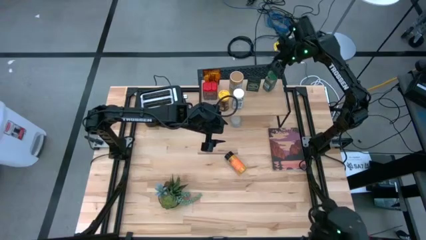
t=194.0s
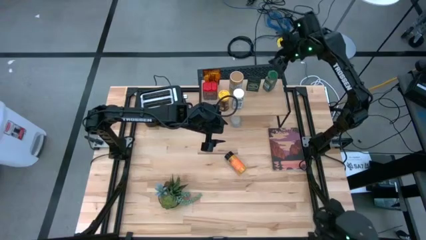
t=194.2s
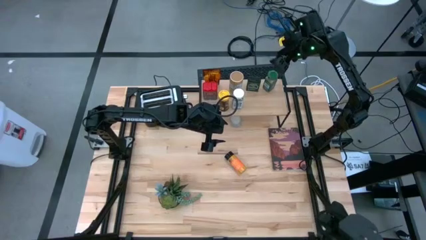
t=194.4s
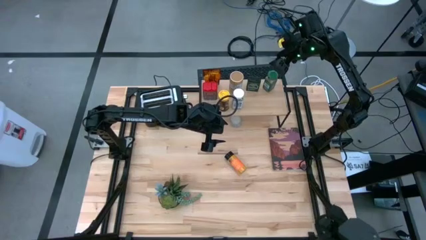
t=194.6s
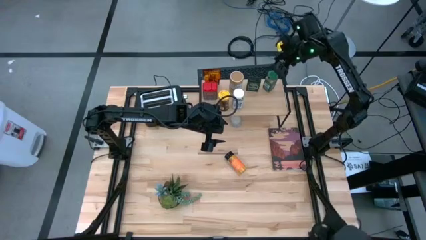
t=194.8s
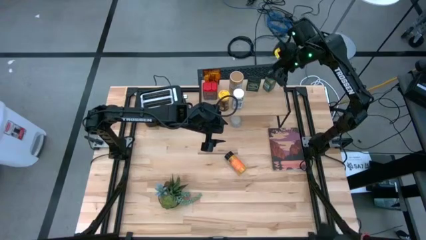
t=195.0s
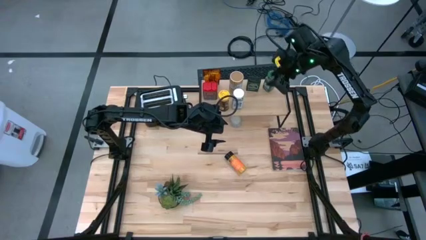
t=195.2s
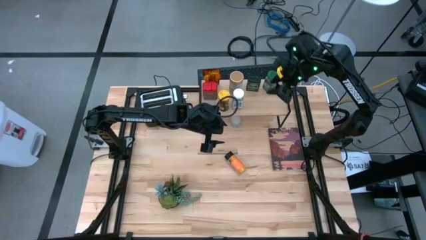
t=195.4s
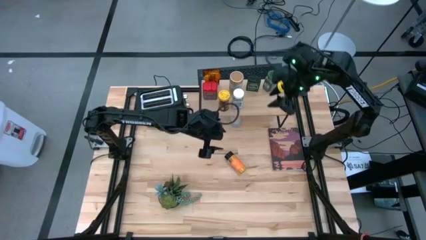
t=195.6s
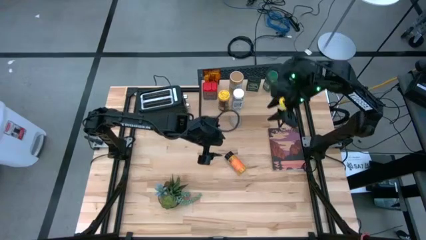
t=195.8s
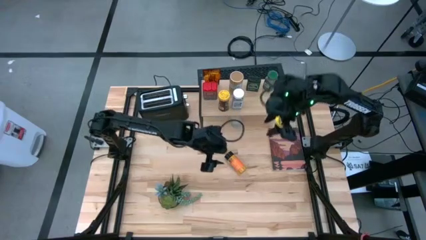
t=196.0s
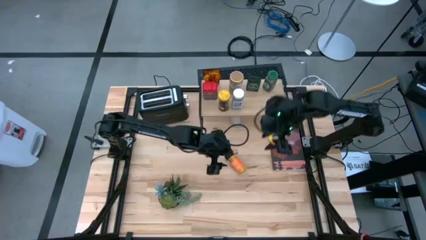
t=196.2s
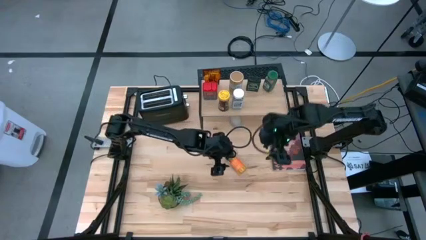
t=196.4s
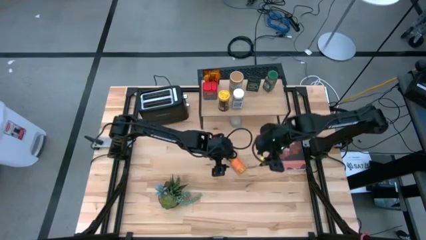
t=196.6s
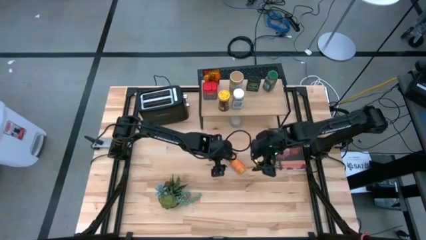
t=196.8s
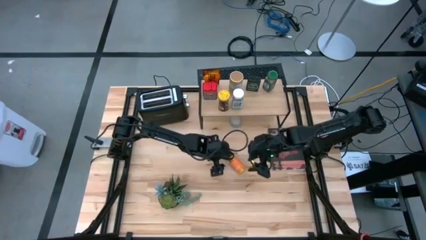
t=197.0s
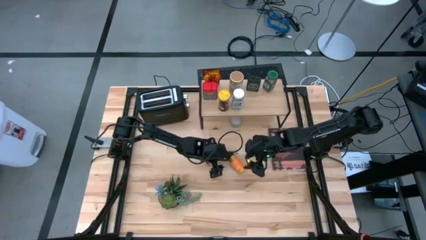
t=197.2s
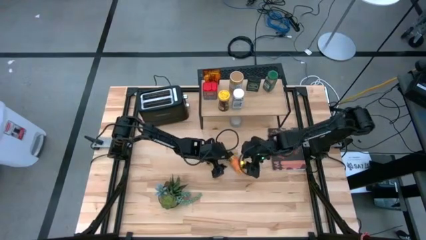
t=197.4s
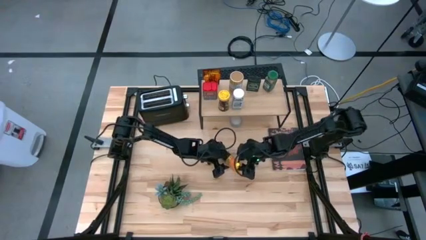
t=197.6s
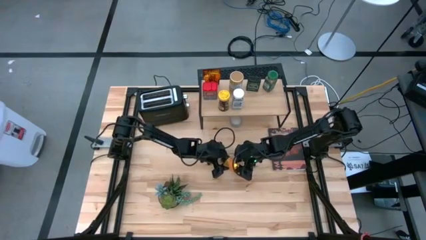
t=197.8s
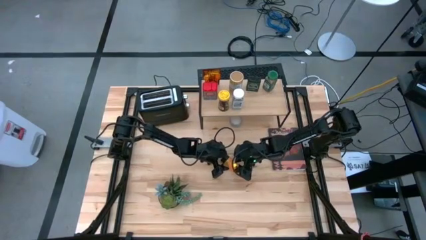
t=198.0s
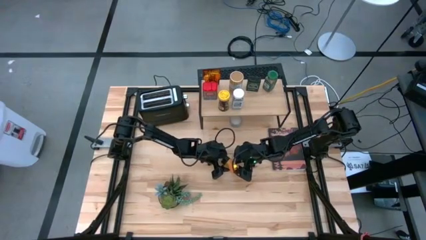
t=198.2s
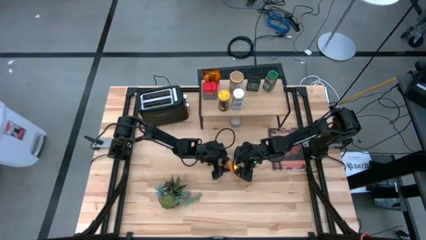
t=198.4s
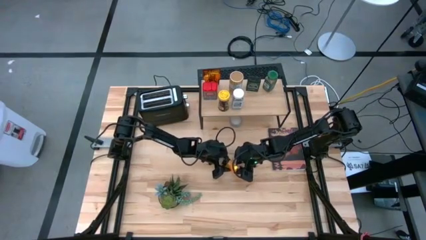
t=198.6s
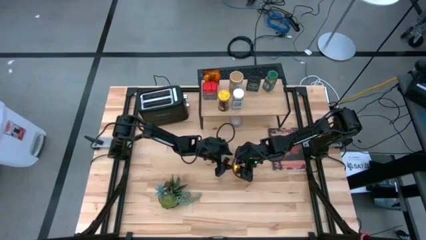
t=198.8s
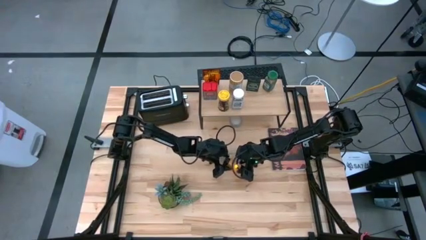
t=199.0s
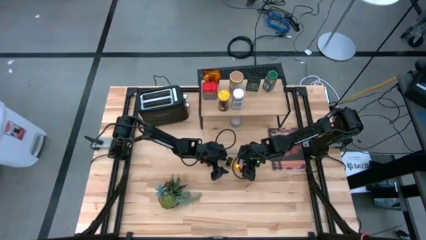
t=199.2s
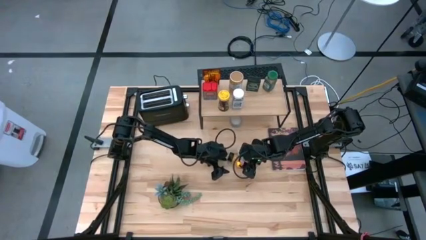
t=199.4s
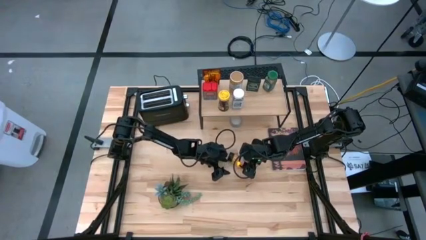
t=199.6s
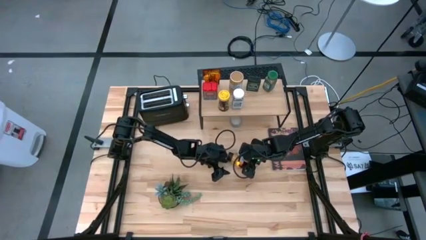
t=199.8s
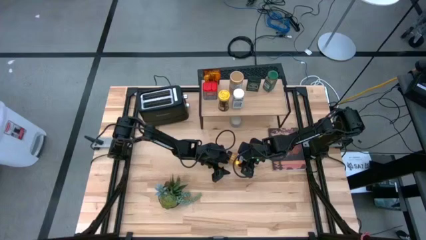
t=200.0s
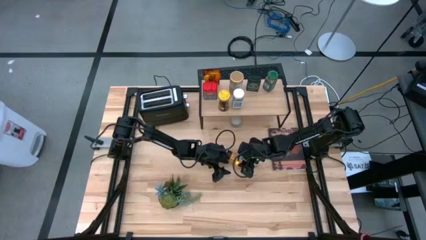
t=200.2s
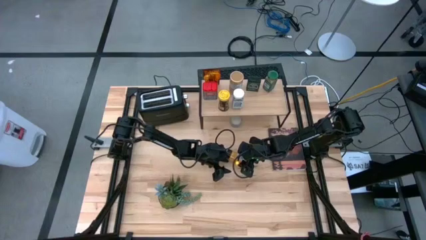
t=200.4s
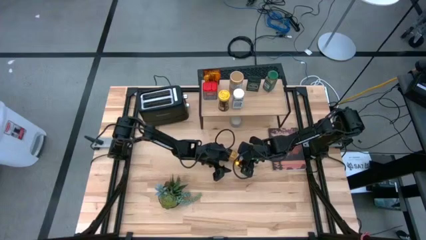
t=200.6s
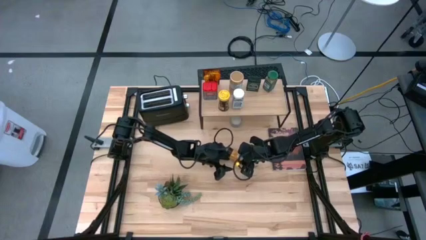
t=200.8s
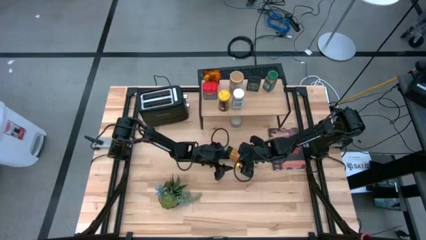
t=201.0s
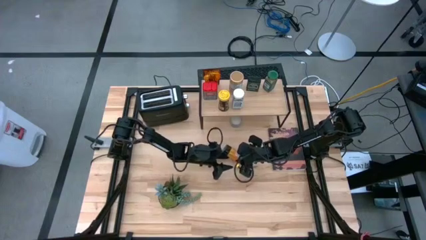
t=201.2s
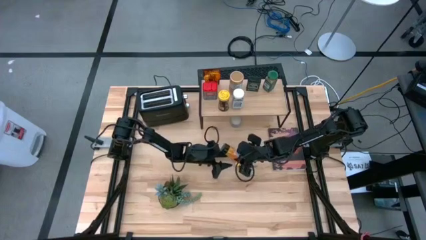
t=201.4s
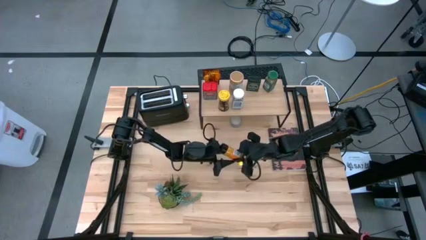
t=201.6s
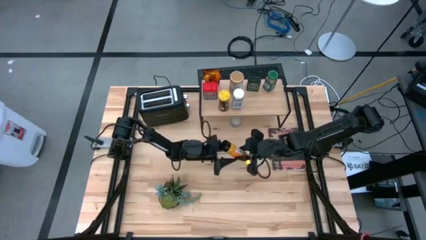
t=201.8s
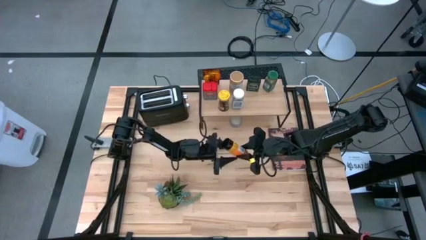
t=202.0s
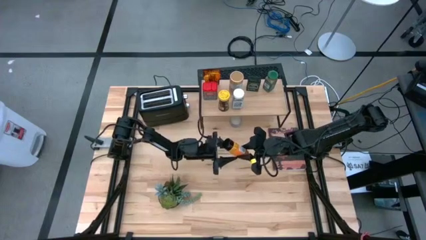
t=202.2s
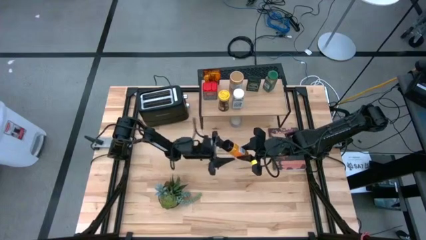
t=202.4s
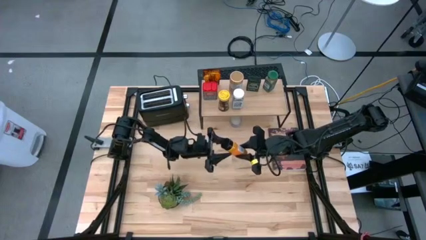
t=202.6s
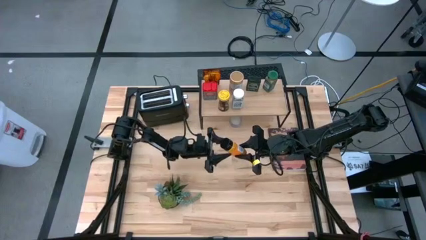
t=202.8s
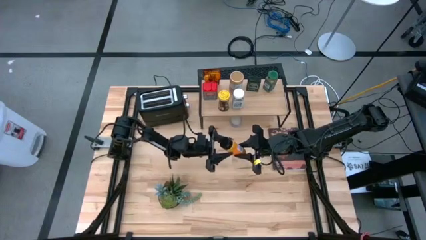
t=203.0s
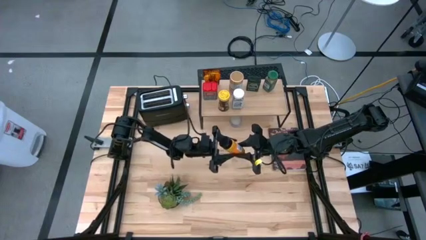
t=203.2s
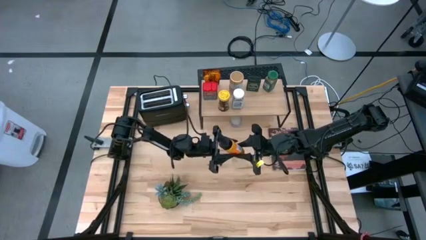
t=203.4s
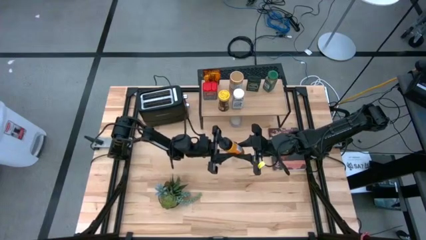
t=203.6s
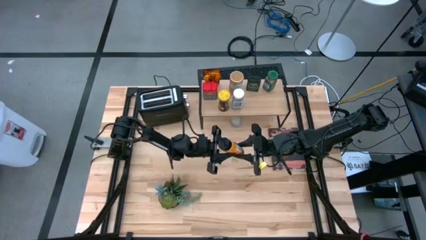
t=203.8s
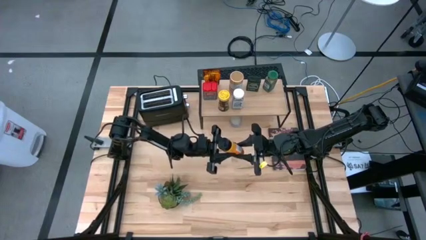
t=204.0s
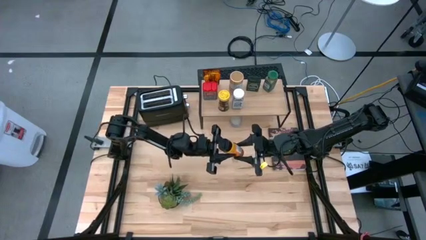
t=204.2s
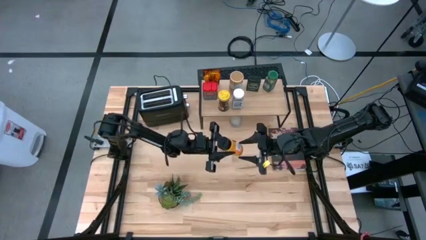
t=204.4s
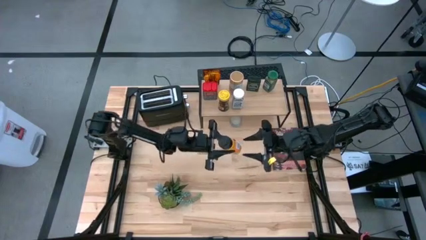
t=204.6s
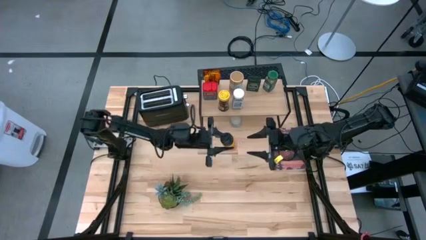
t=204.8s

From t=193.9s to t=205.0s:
Task: Shelf spices
Put the orange seasoning bottle on the shelf

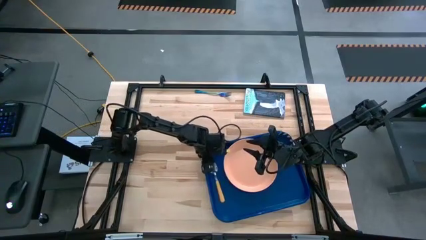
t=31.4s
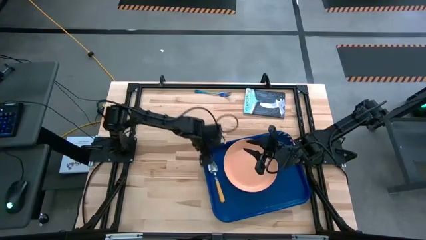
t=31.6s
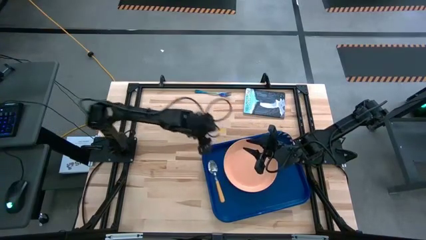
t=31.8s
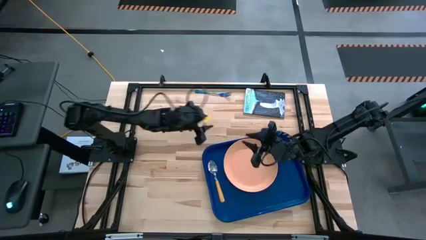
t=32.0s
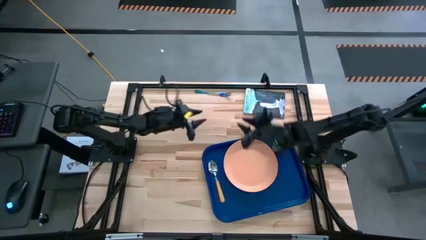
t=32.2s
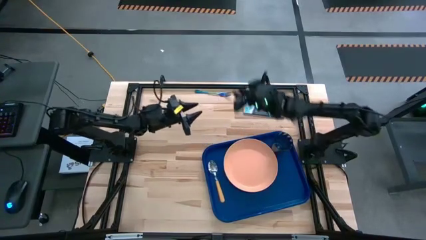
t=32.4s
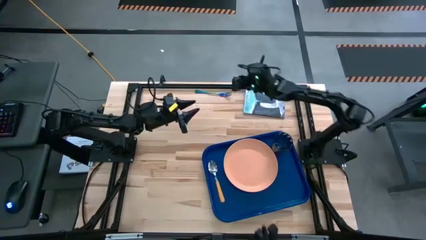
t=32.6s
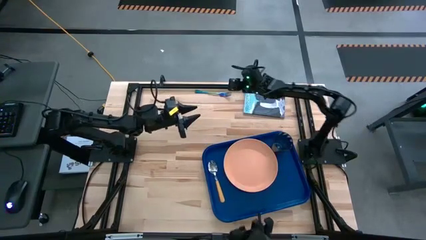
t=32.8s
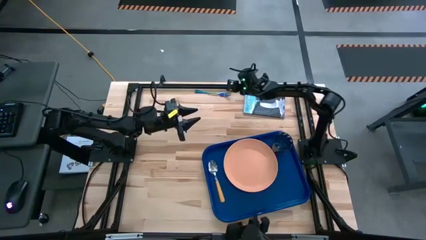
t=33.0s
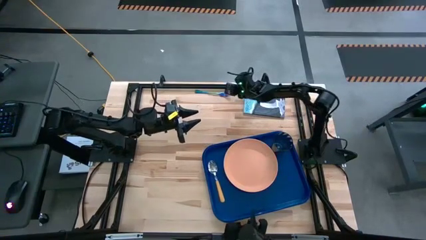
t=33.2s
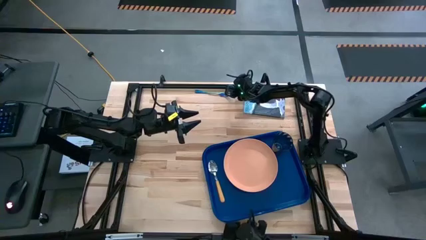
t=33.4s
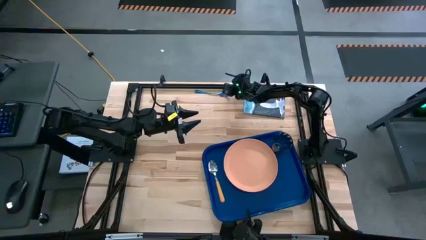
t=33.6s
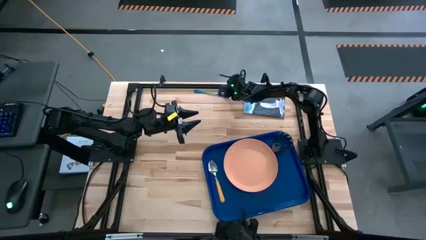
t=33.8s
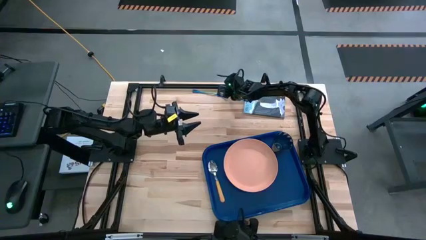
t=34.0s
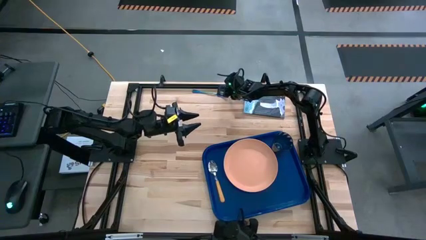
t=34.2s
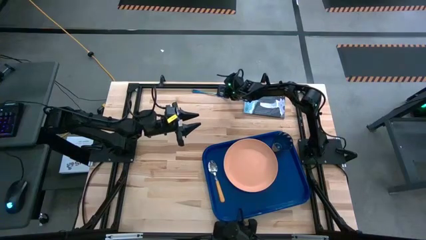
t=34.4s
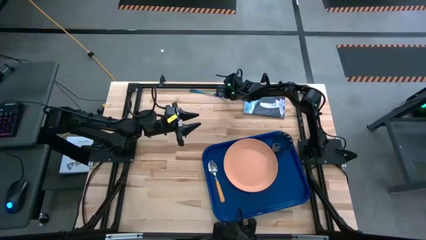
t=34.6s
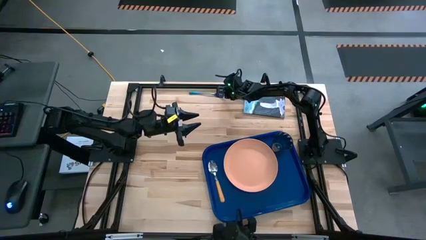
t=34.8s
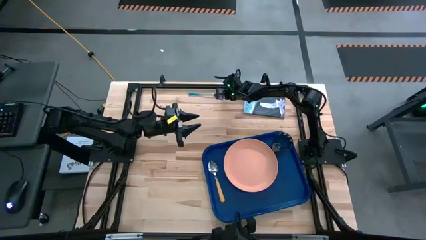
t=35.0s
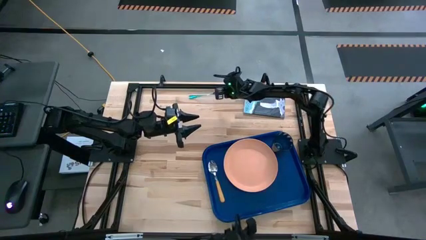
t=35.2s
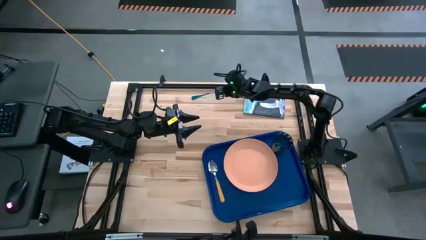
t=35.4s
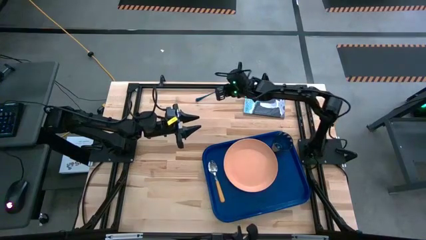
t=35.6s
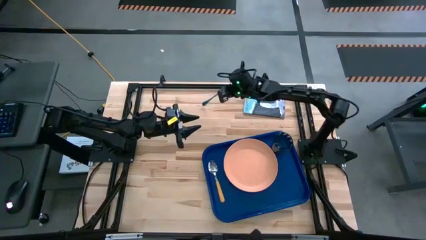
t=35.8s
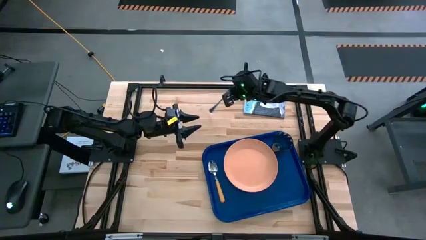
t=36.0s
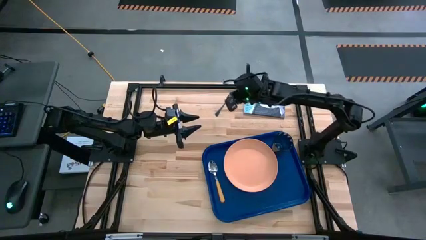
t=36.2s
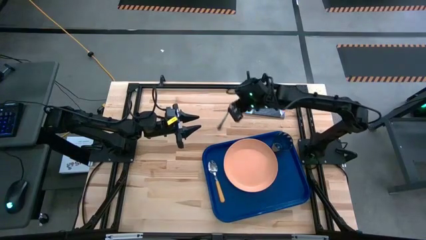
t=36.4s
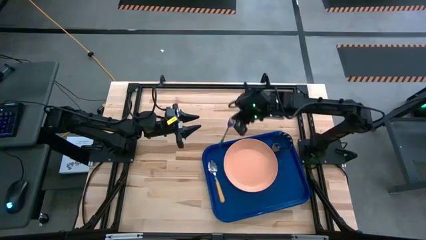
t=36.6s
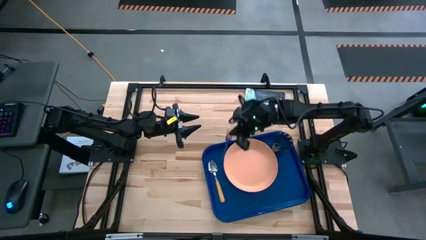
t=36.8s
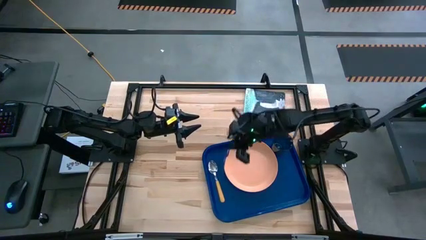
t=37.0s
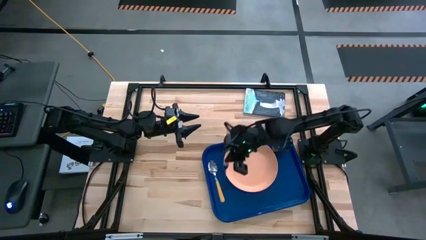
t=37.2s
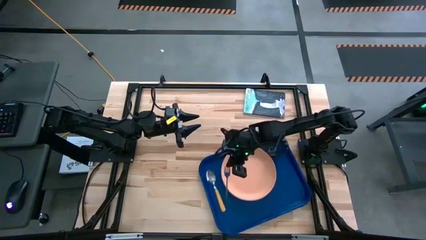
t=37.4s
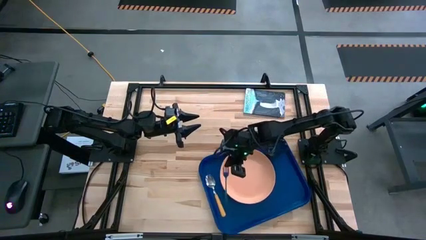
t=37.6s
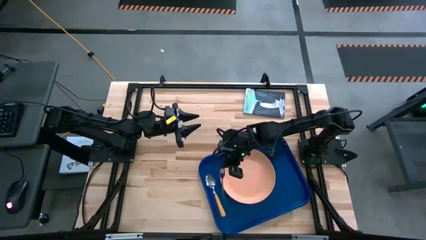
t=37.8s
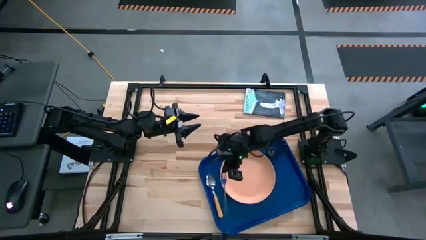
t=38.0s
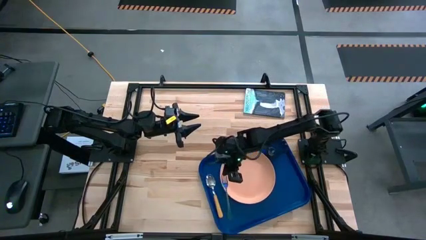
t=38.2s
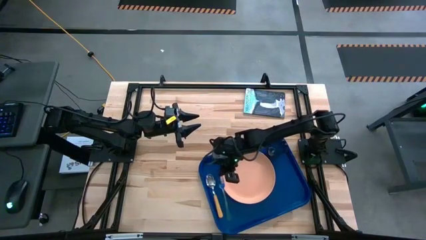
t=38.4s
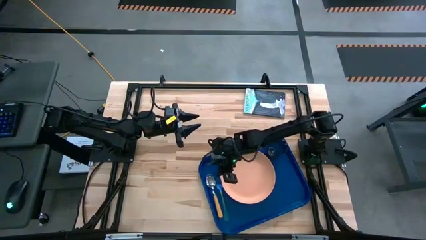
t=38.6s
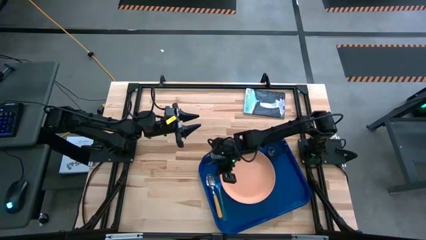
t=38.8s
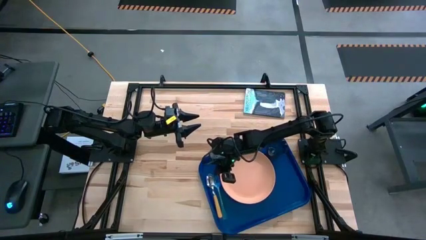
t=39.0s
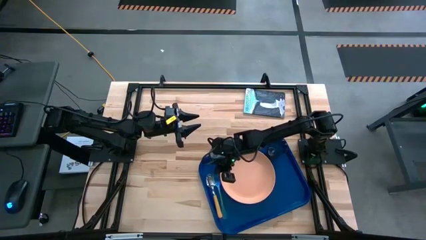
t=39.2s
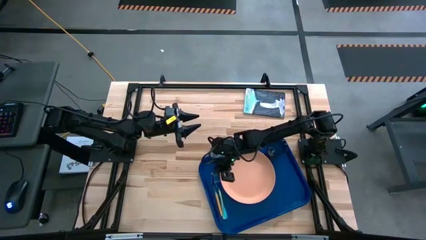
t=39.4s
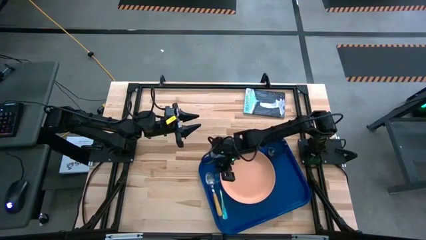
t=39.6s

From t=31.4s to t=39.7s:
Task: Pick and place plate/cup/fork/spoon on tray
Put the violet fork on the blue table tray to the left of the orange plate
